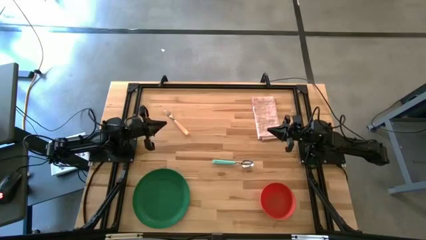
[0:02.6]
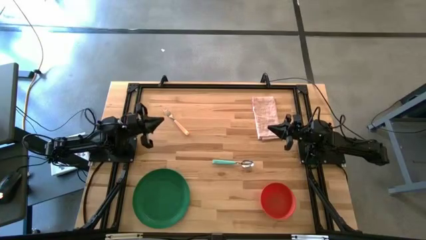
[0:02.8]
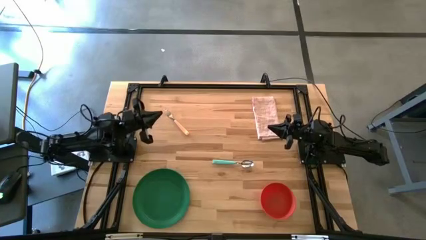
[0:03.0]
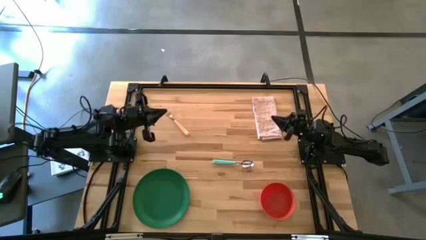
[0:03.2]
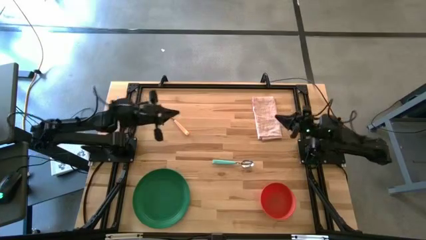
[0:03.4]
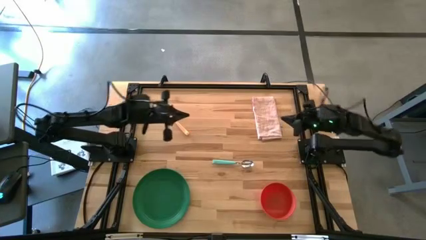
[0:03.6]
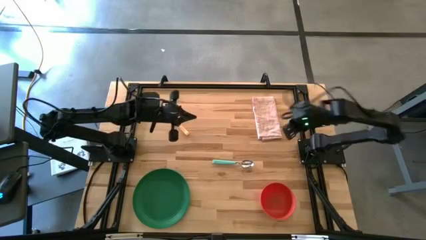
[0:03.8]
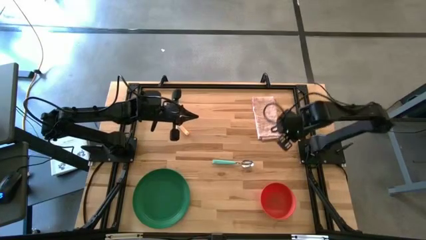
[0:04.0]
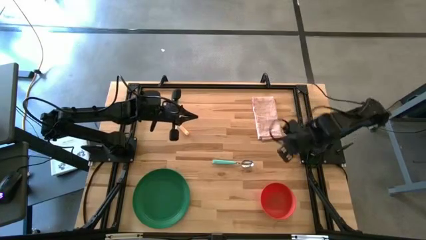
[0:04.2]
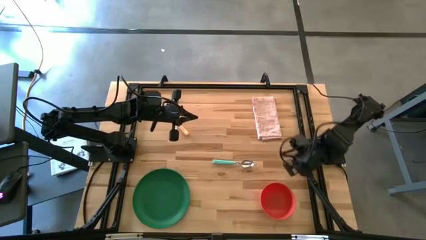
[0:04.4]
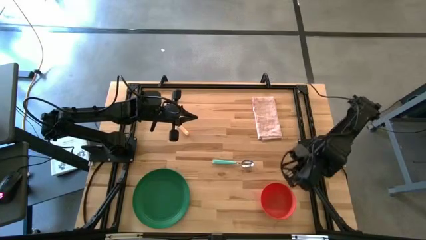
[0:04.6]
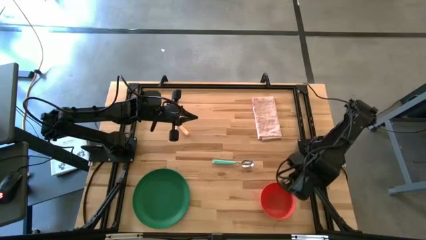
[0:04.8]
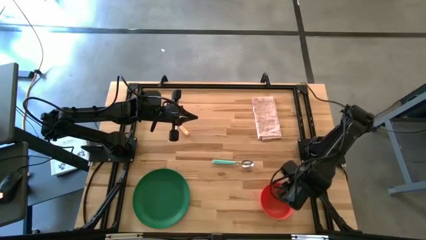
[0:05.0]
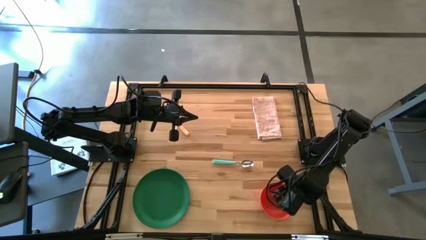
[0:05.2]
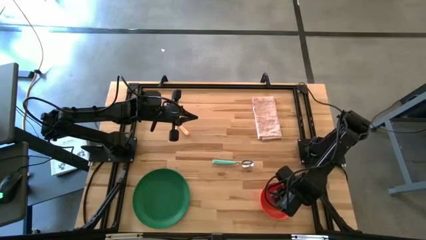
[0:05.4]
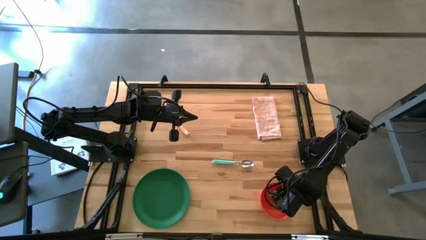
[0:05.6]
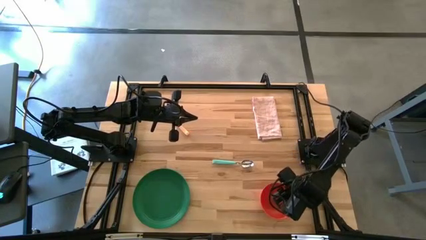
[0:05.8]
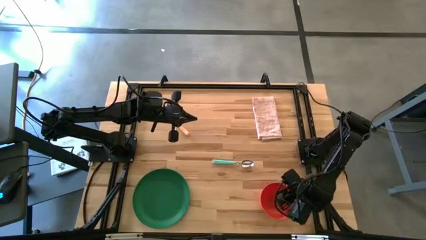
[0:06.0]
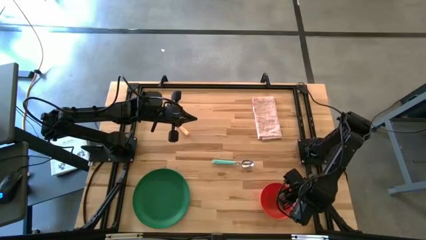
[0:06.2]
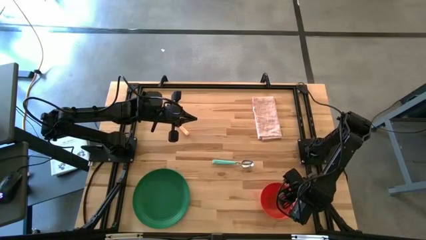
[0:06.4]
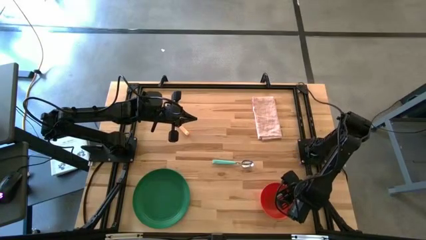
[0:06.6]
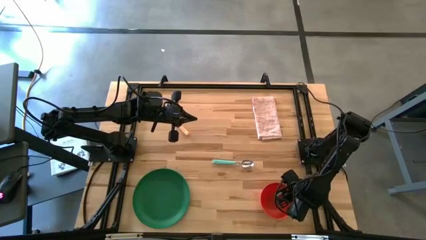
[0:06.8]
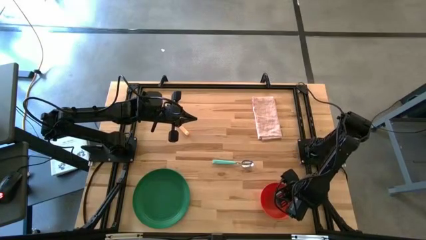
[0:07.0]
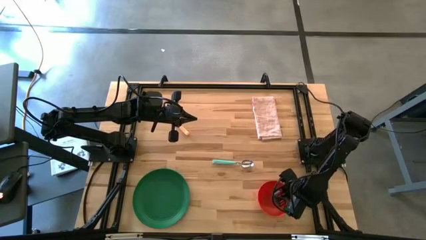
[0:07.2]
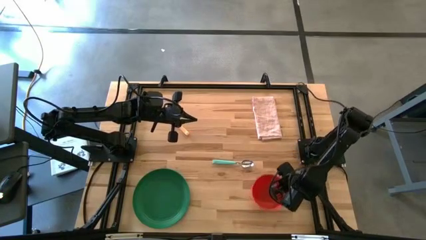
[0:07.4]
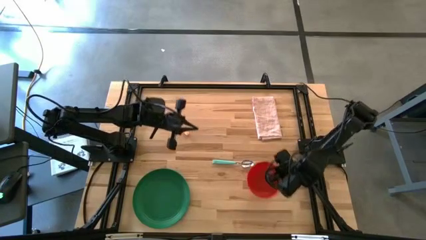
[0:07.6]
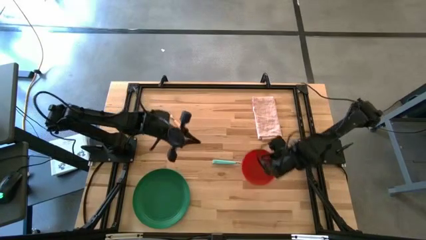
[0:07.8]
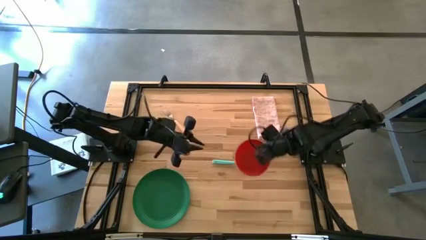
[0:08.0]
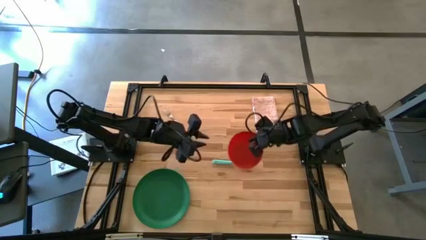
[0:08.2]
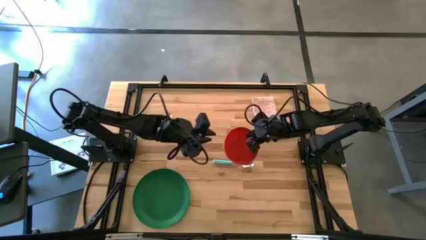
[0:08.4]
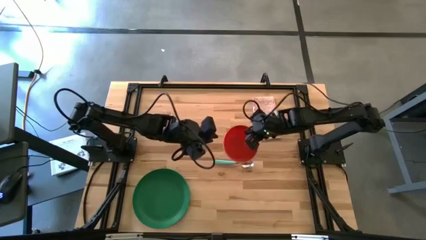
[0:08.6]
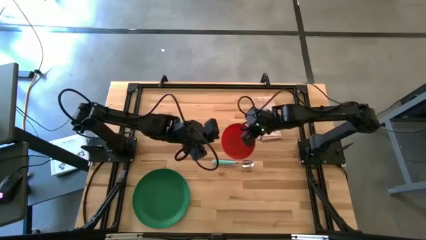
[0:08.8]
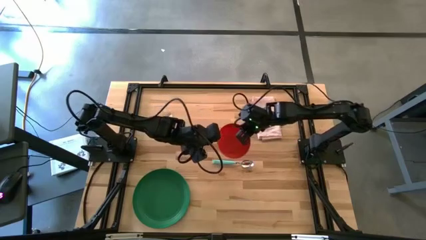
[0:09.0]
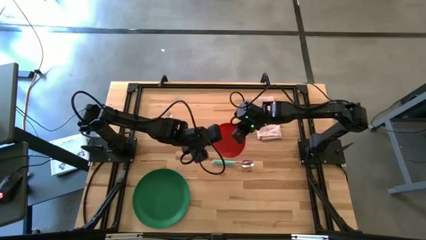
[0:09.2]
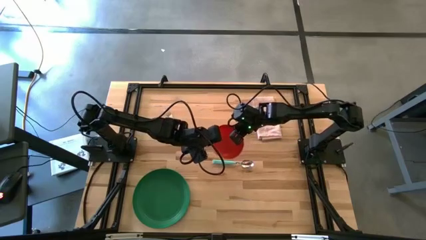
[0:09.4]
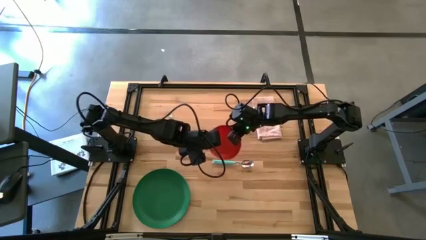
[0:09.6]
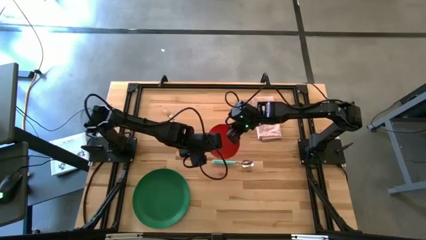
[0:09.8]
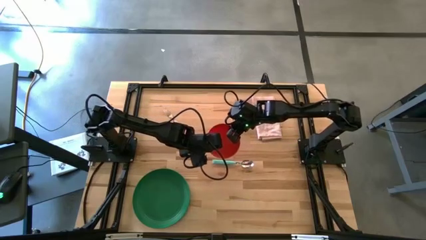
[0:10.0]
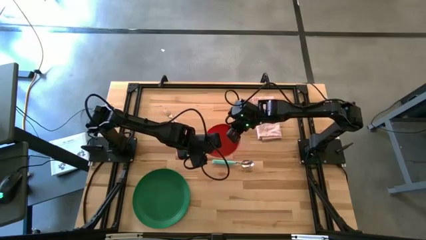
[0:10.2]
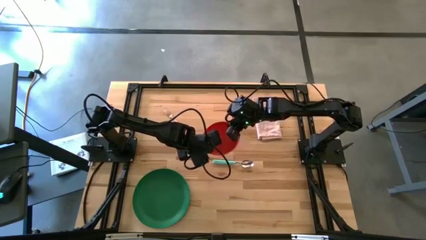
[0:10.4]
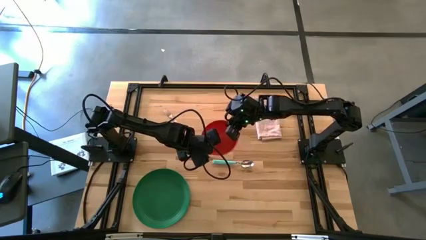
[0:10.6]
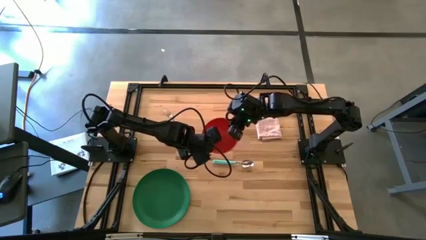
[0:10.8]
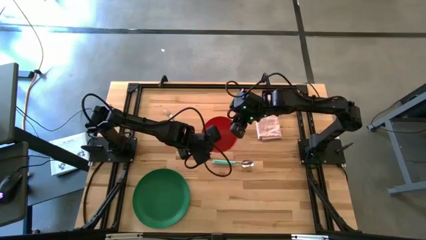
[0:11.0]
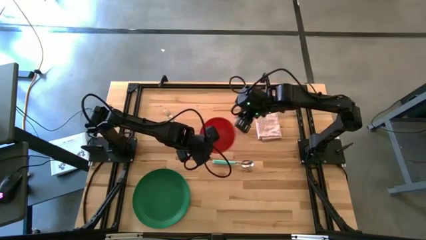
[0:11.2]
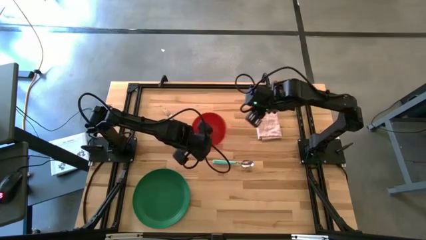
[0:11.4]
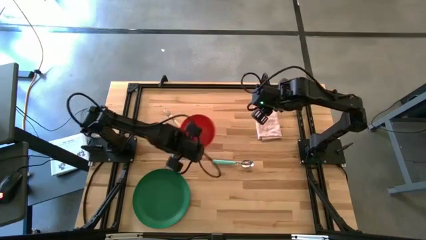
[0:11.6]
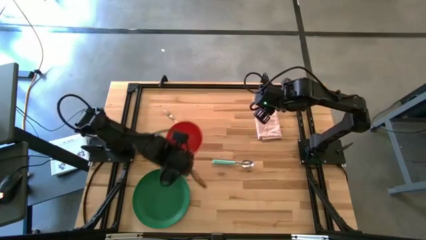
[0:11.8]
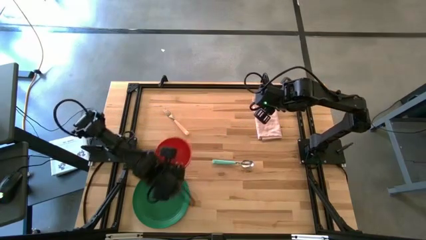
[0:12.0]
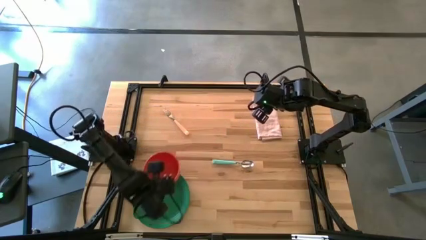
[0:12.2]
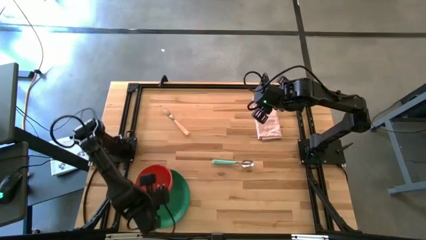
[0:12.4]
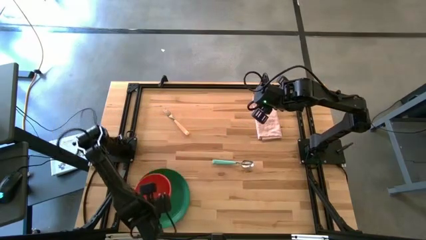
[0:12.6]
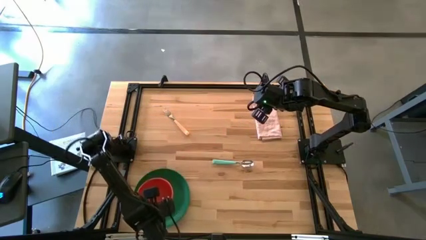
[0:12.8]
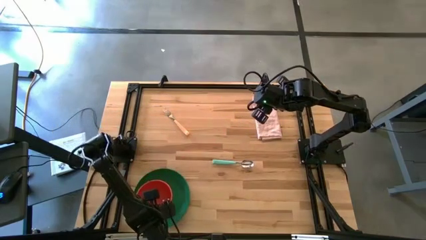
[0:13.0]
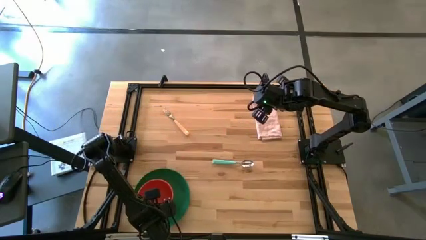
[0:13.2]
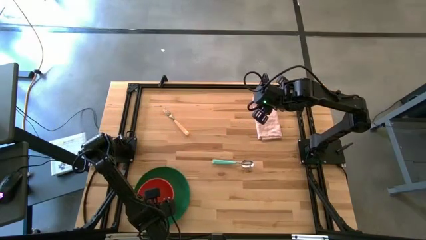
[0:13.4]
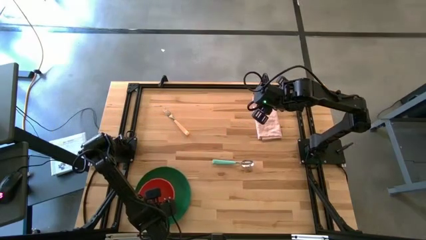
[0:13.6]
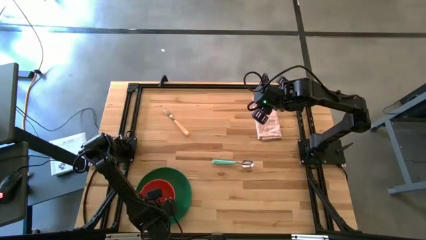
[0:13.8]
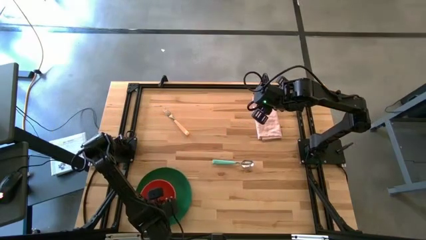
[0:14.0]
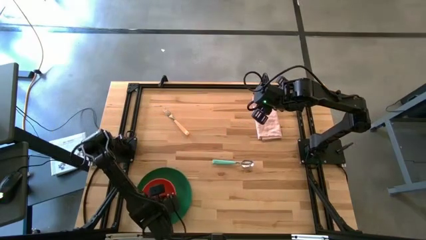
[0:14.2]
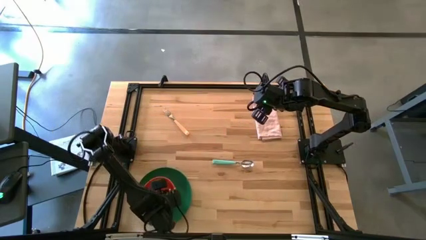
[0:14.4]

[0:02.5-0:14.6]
Task: Set table place
Put the orange bowl on top of the green plate

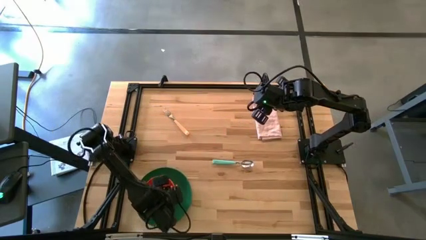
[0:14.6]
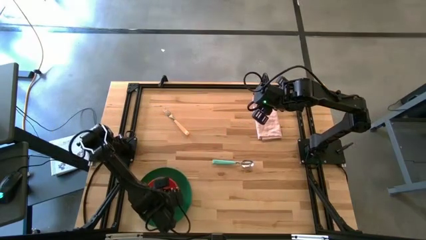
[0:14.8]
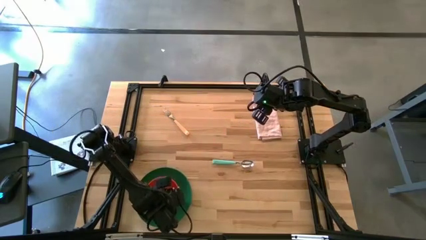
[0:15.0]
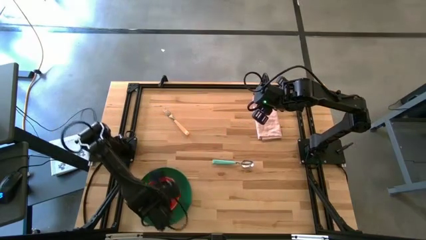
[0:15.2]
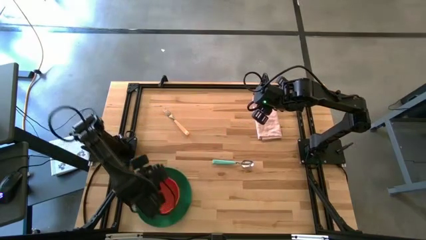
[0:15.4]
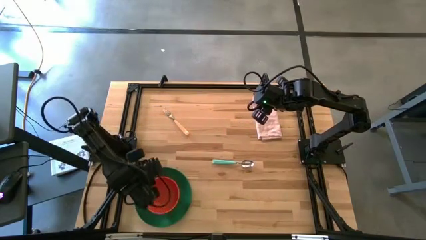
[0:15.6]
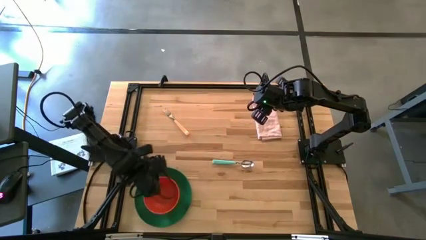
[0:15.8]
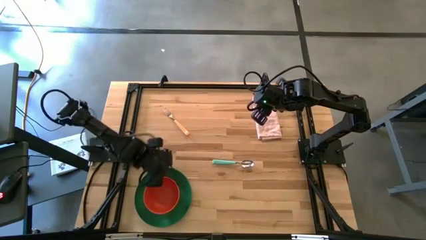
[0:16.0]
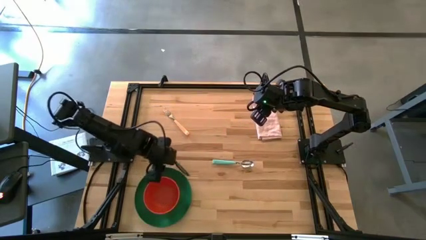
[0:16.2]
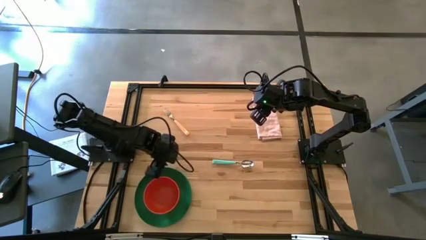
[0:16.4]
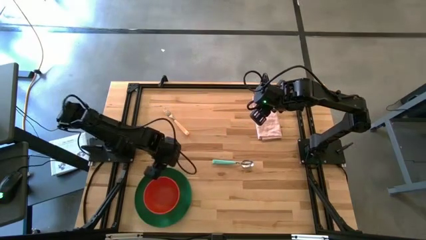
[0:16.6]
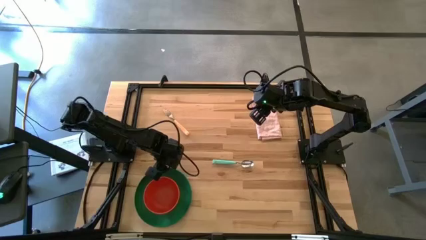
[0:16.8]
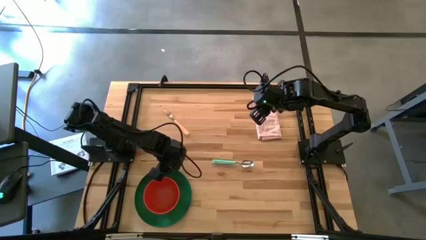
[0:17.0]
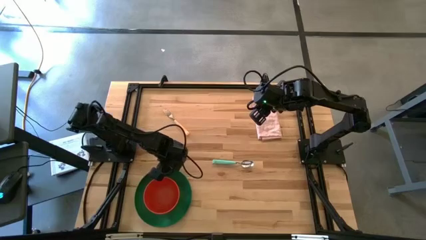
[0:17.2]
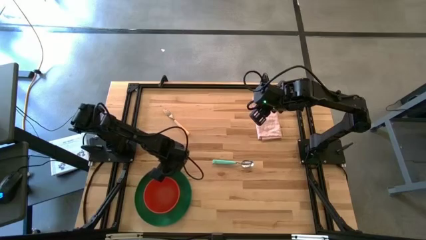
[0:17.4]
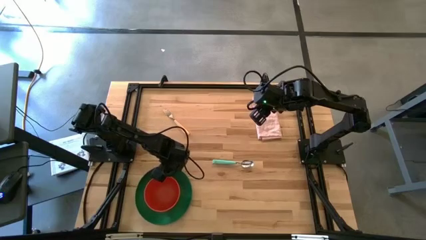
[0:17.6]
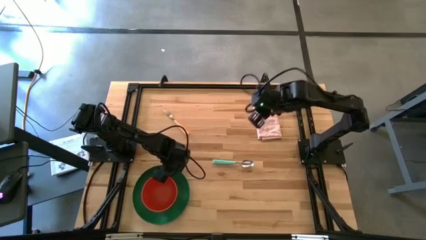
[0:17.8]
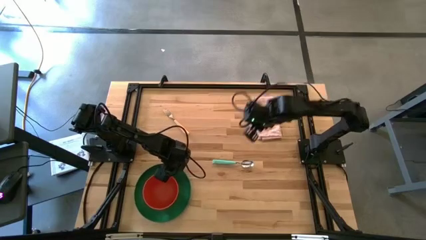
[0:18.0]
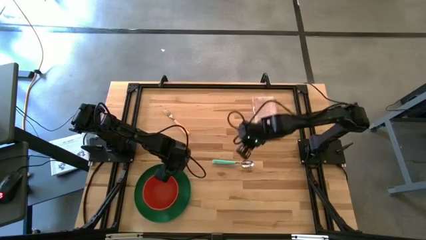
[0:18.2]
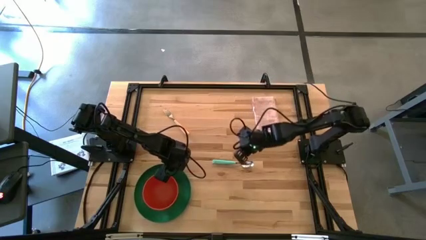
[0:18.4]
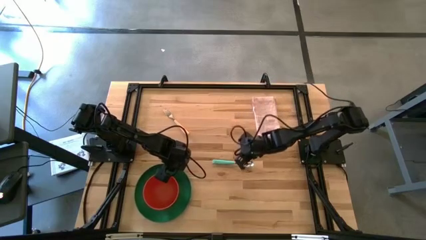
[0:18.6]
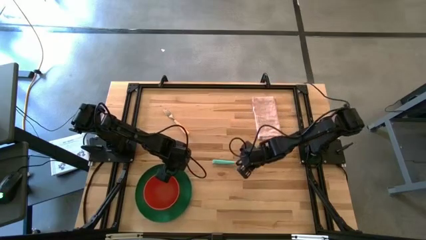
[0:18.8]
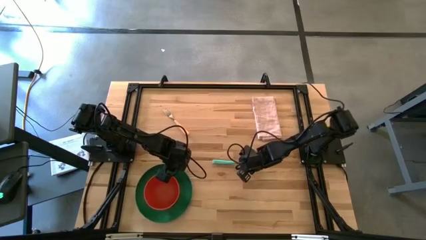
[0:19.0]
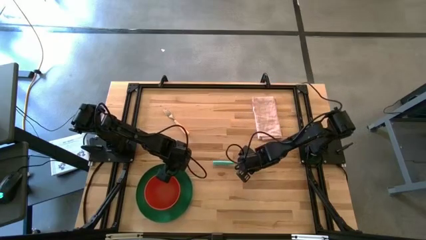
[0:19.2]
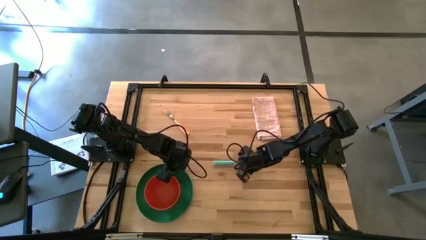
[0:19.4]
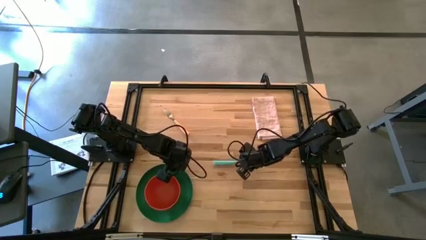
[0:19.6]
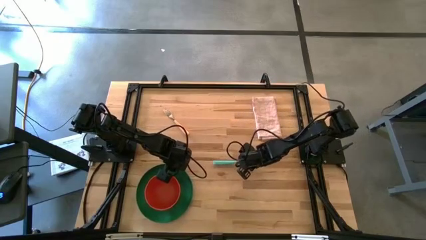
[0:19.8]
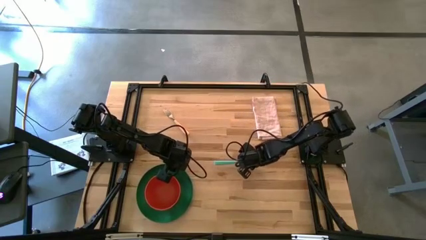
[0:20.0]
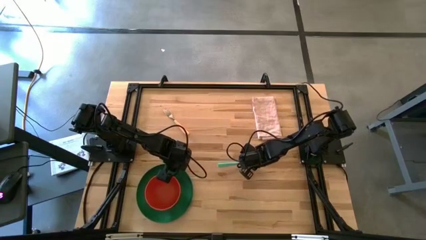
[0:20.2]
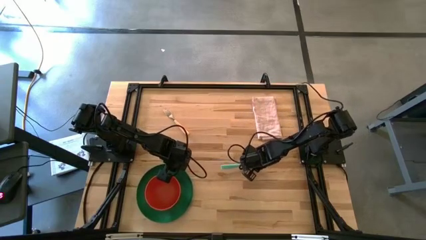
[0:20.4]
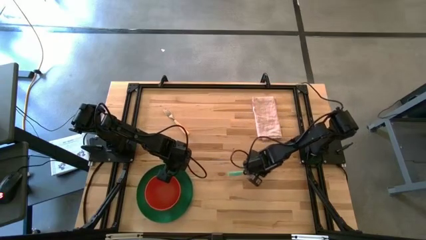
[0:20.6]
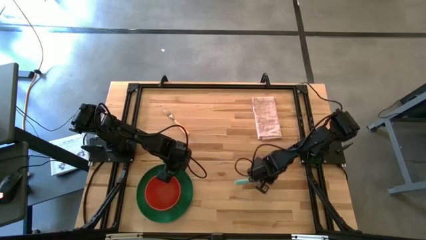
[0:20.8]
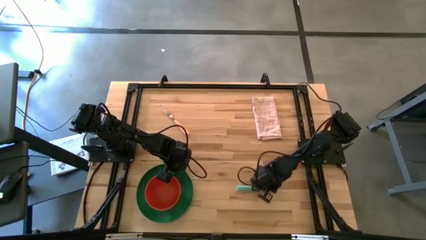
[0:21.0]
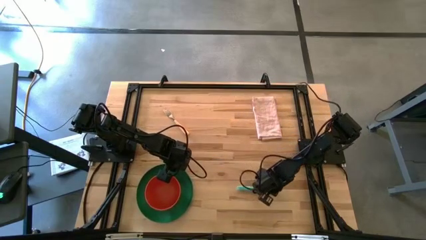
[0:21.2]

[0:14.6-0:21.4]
Move the blue spoon to the bottom right of the table
